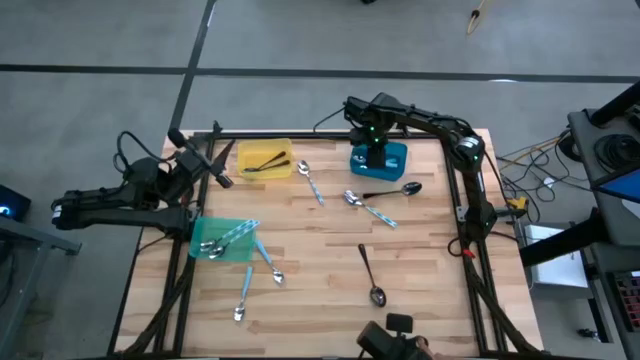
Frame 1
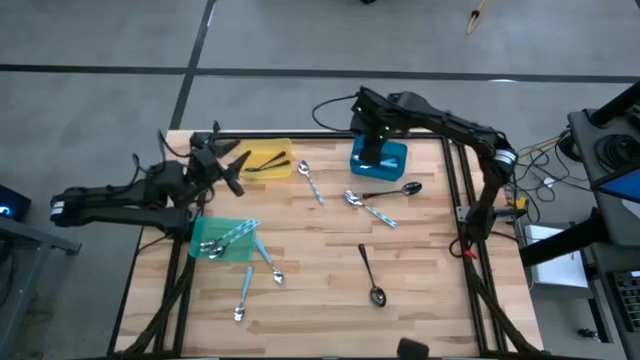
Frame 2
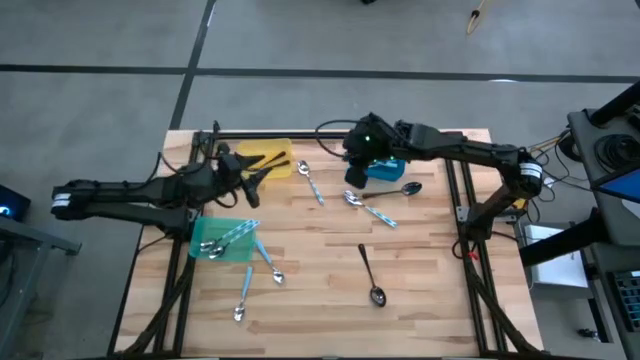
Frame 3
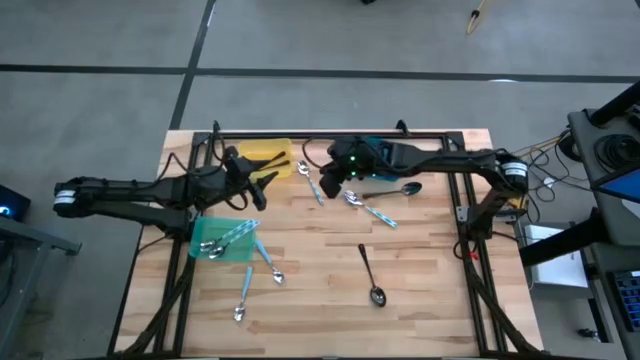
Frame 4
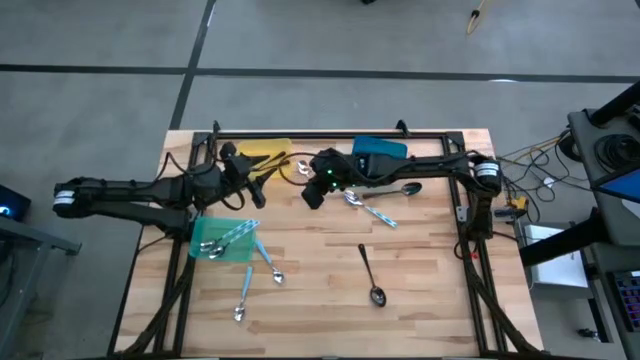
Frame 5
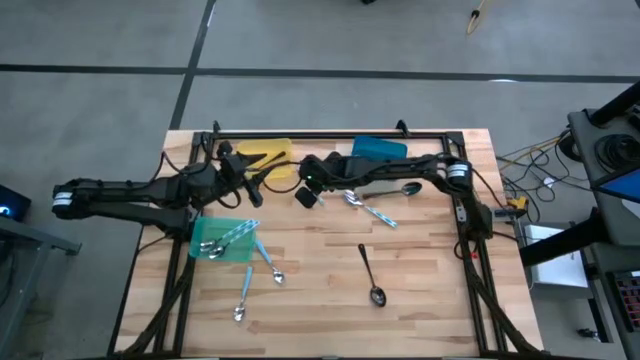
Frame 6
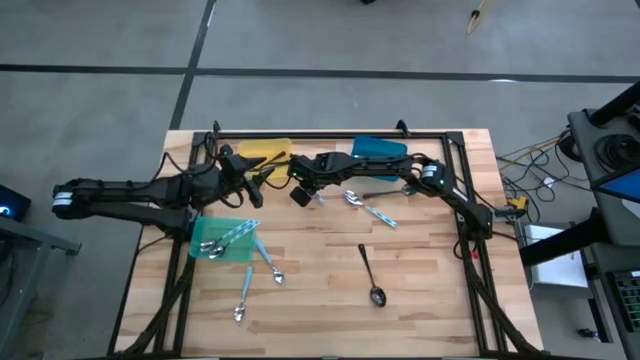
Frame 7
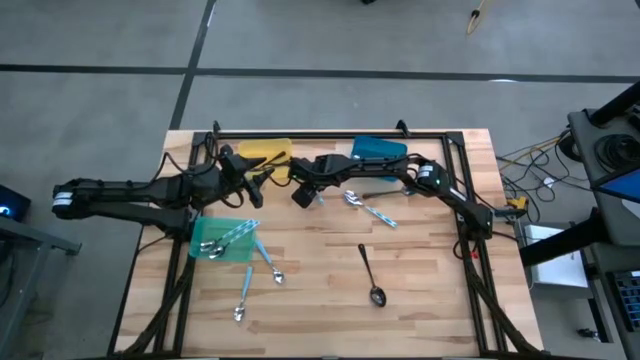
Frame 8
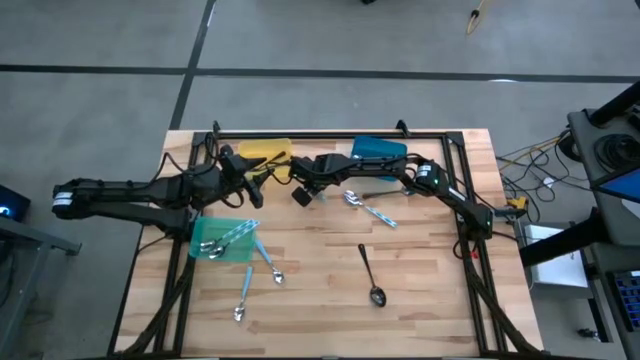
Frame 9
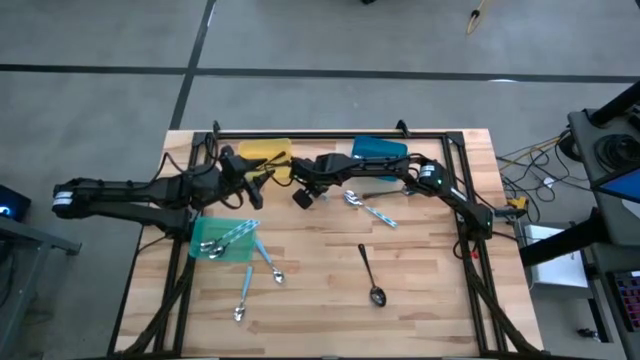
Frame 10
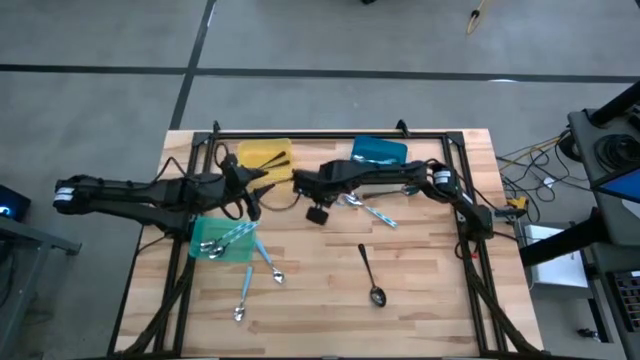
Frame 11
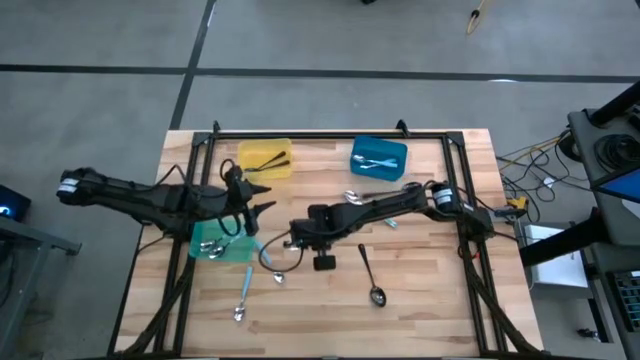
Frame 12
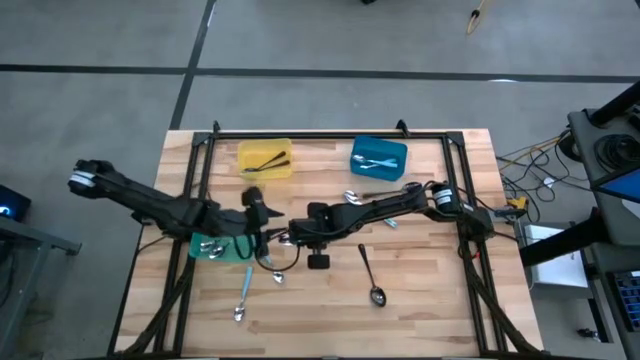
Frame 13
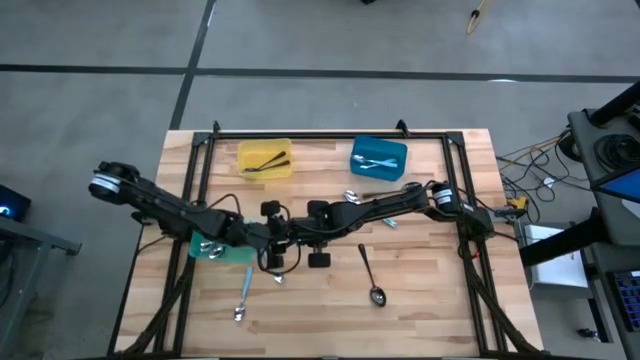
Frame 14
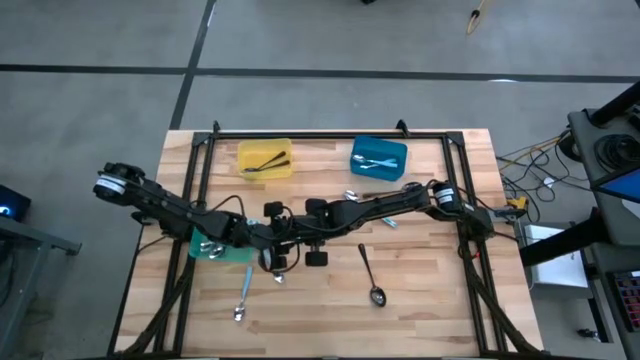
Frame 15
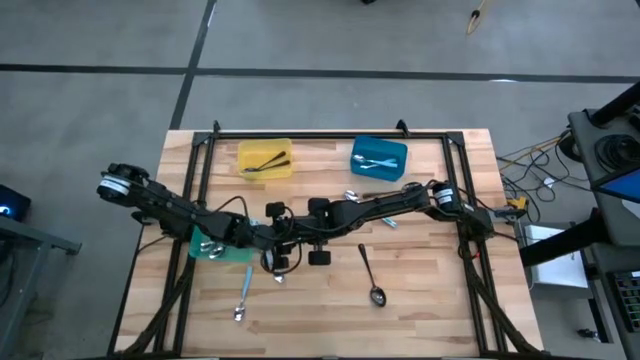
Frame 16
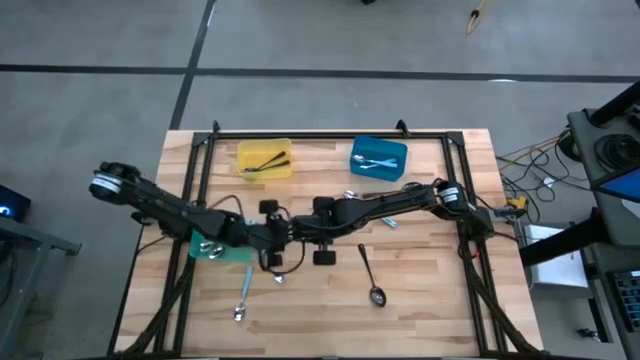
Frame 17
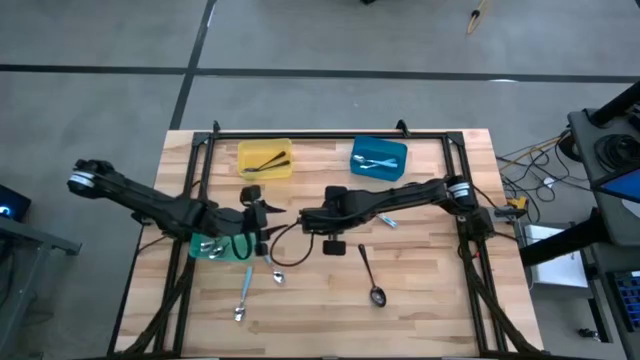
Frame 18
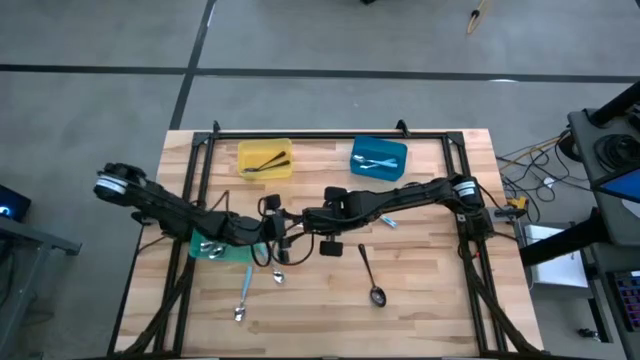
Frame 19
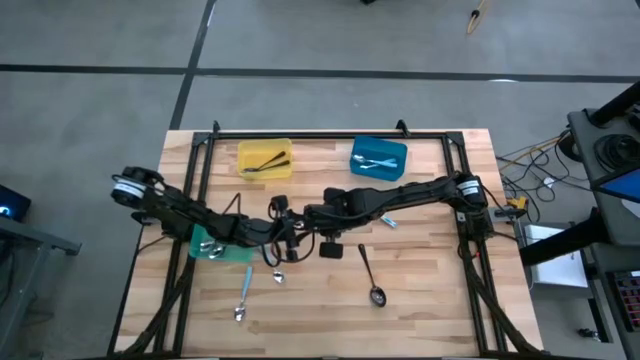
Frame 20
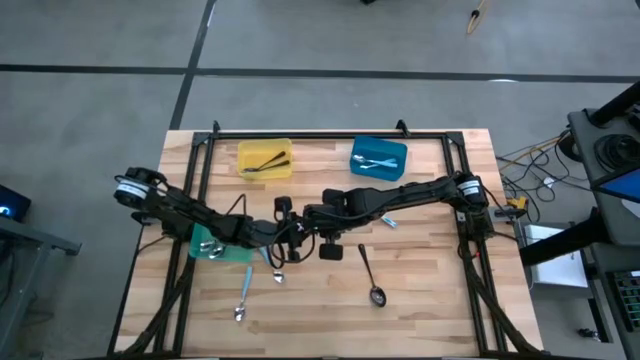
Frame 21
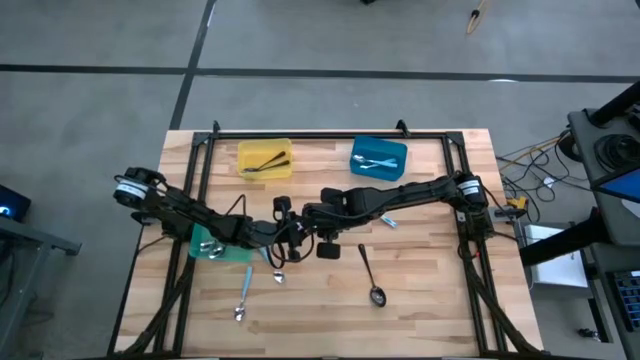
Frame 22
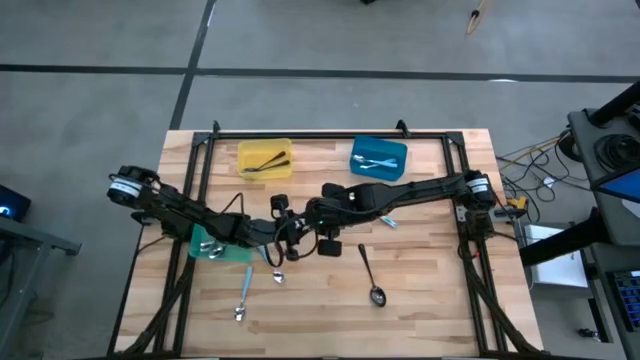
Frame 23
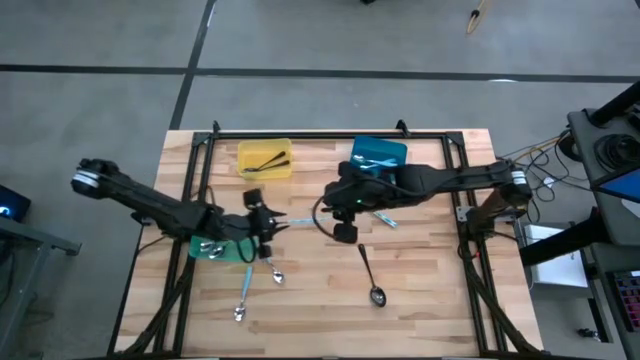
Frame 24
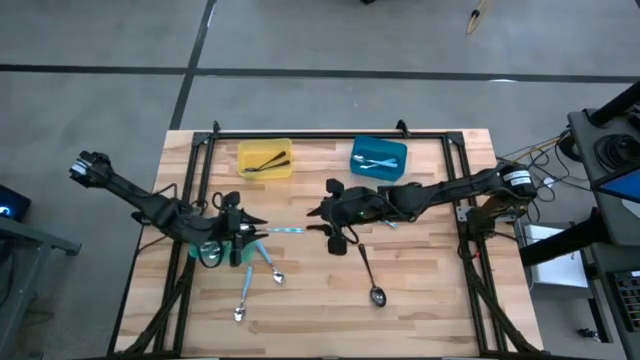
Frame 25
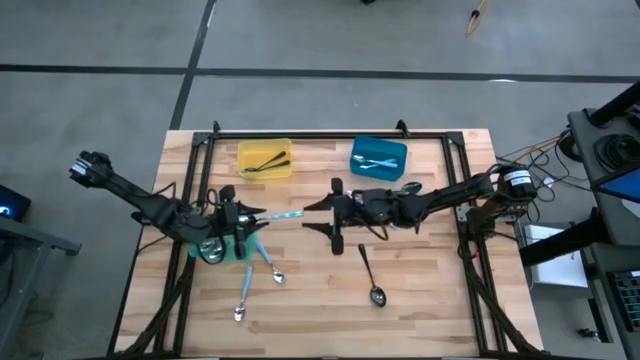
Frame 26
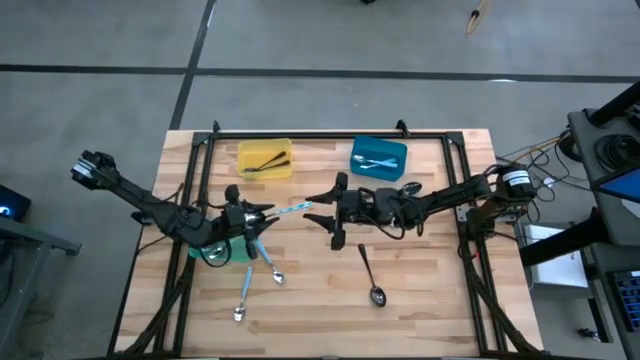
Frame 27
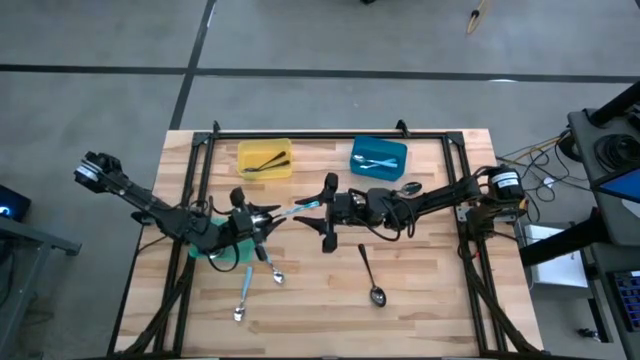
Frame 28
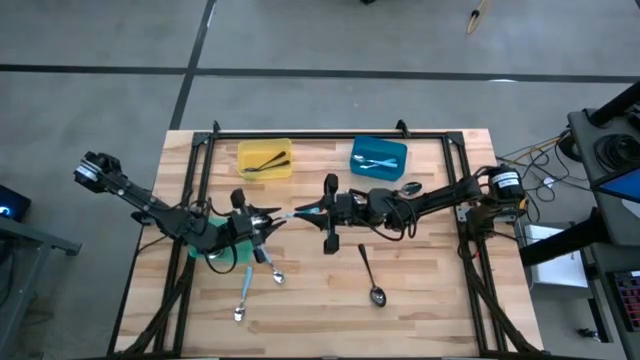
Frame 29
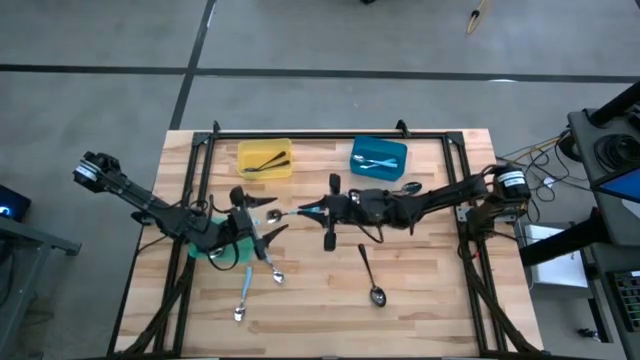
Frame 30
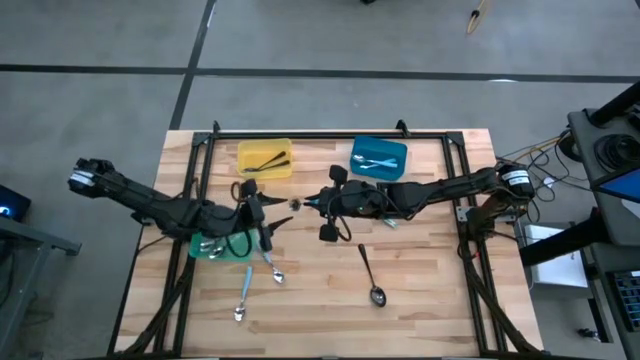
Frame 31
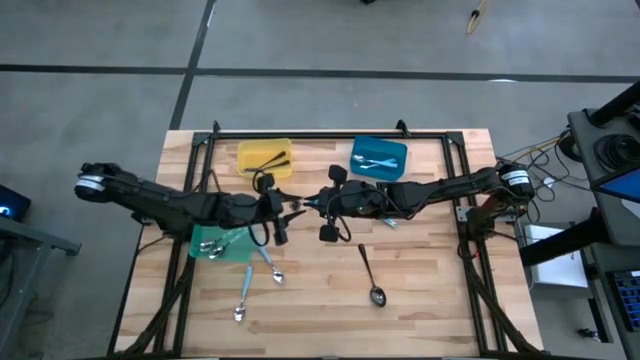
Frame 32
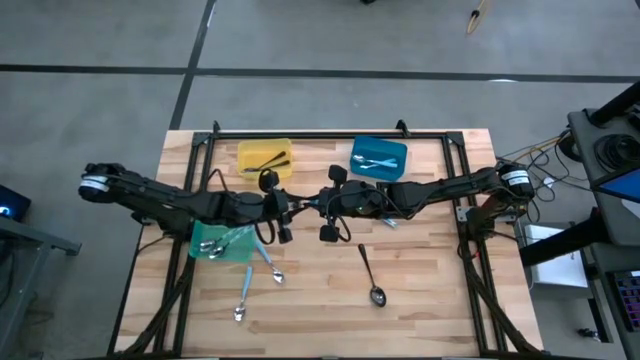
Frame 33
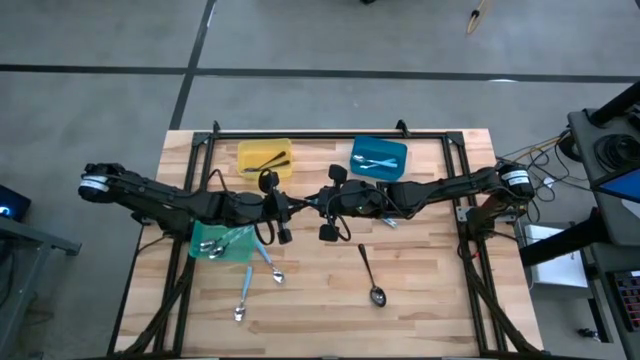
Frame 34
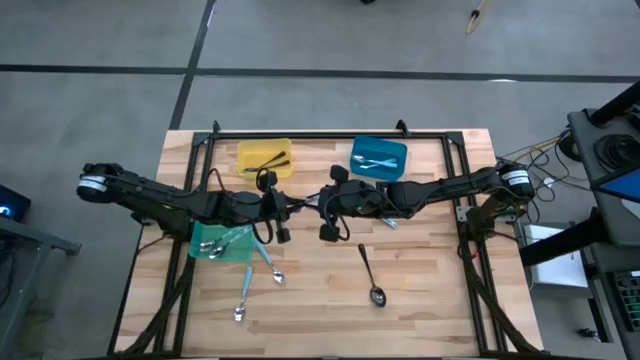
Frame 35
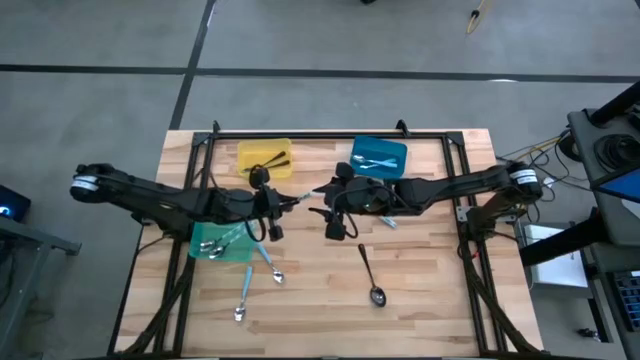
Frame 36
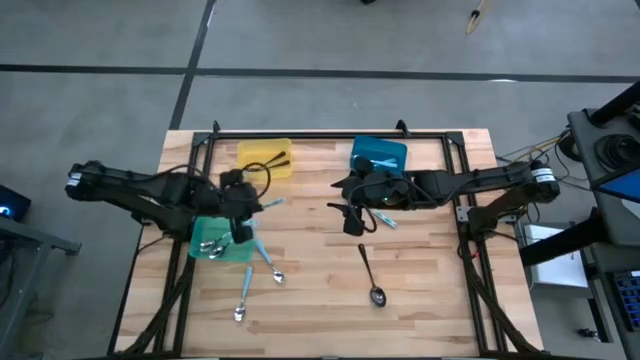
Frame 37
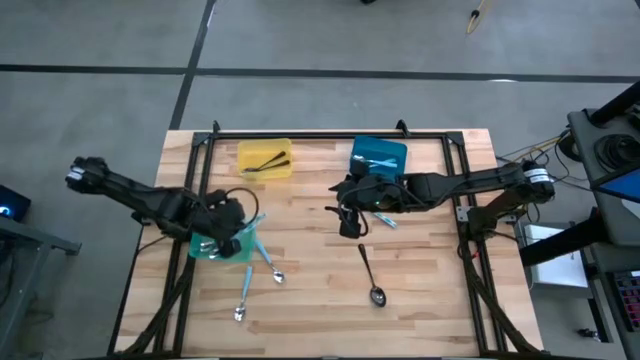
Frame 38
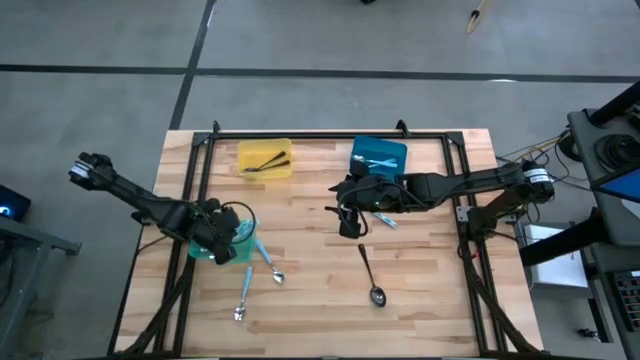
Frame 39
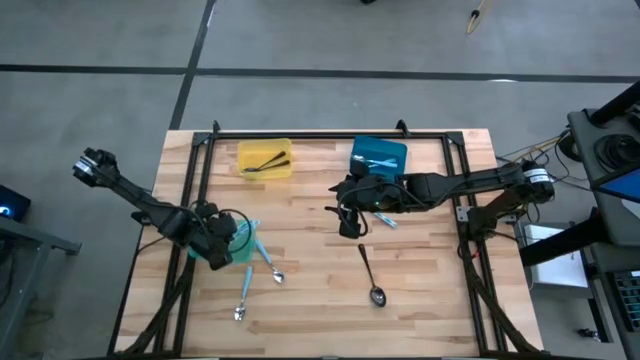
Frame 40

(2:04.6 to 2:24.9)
Task: Sort silverware by color (type)
Put the blue patterned spoon into the green bin
